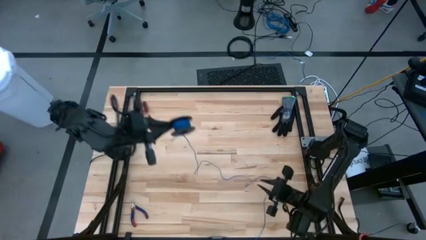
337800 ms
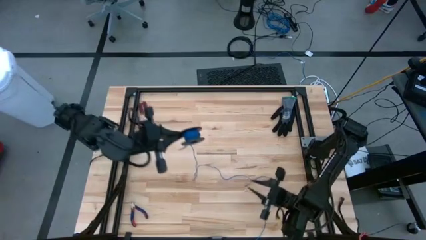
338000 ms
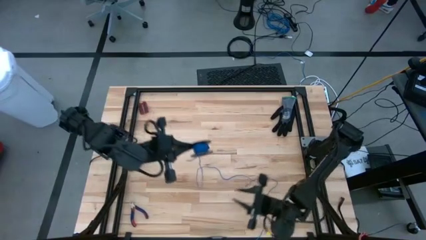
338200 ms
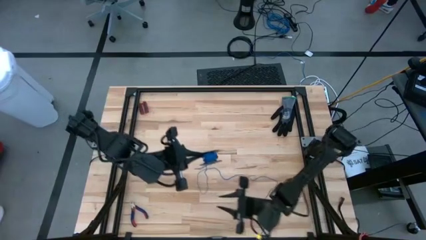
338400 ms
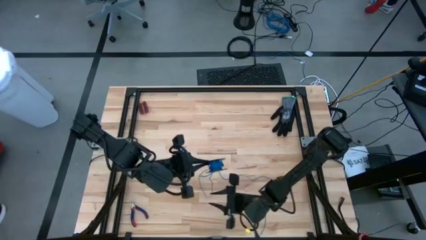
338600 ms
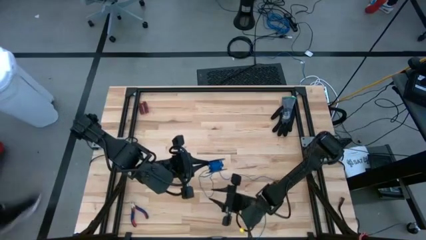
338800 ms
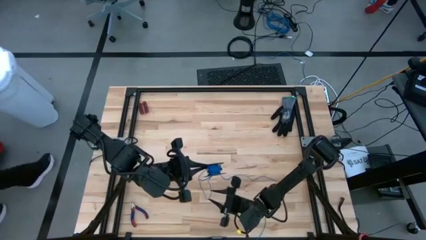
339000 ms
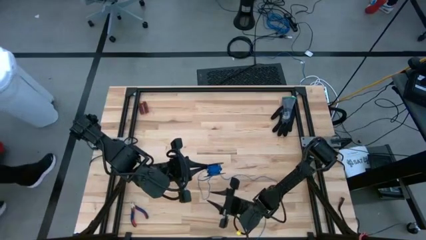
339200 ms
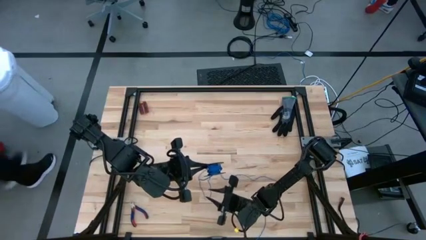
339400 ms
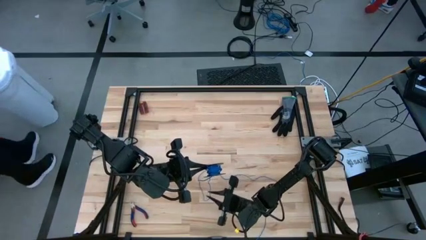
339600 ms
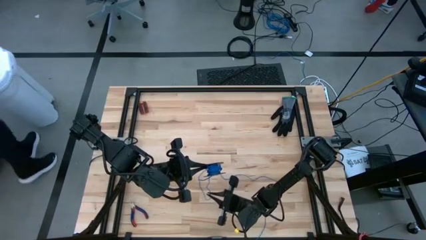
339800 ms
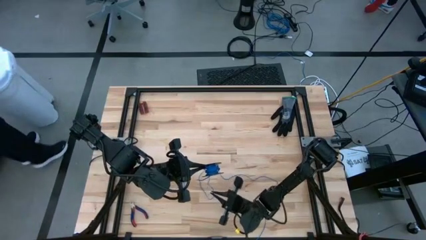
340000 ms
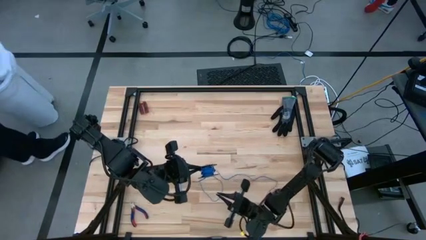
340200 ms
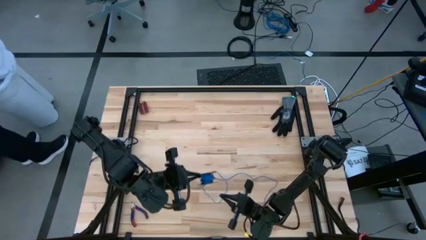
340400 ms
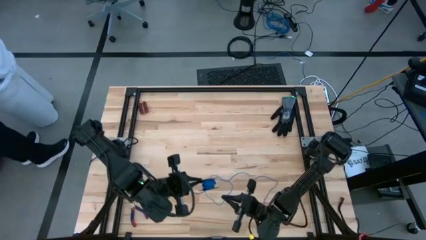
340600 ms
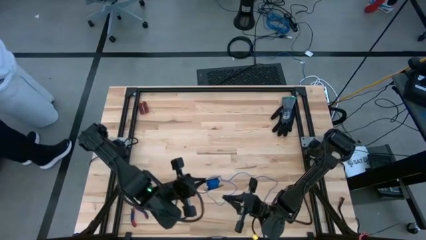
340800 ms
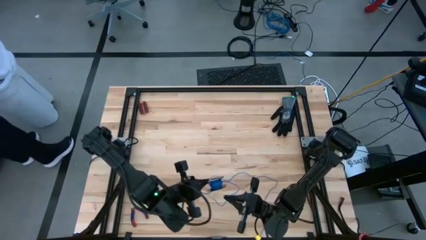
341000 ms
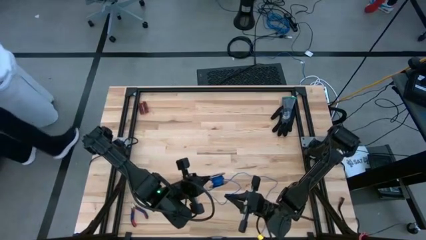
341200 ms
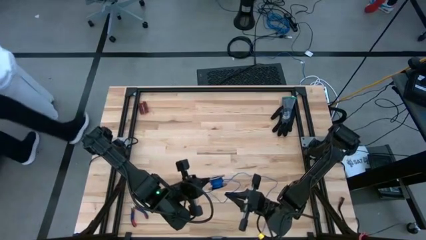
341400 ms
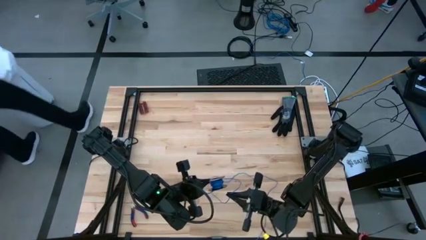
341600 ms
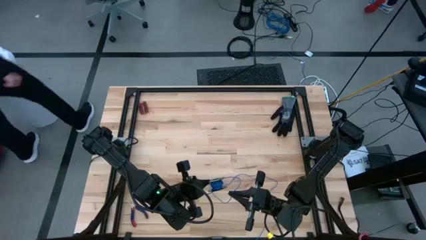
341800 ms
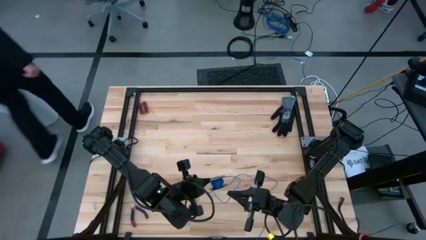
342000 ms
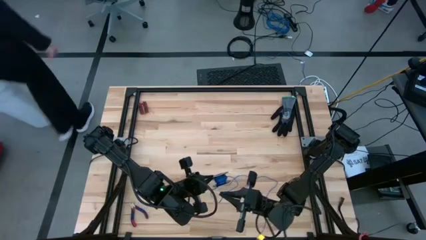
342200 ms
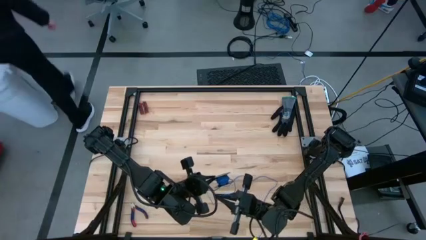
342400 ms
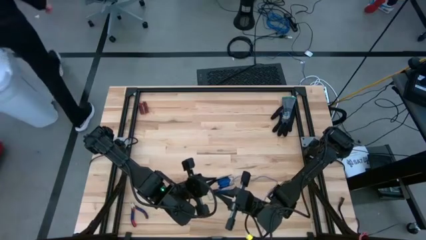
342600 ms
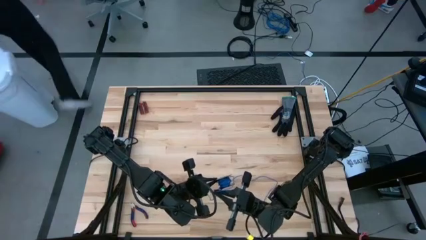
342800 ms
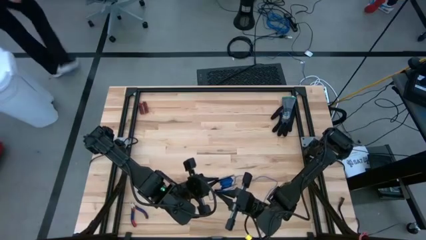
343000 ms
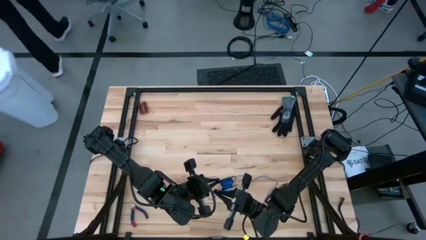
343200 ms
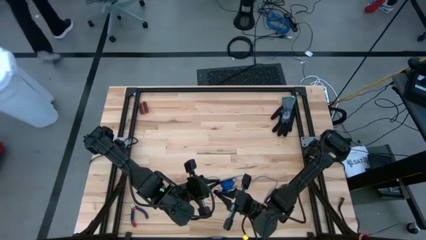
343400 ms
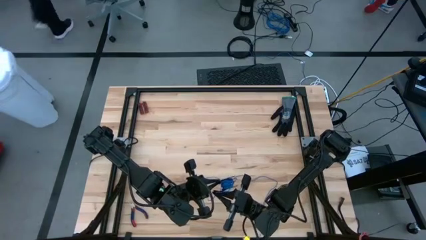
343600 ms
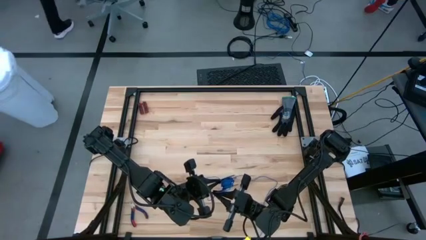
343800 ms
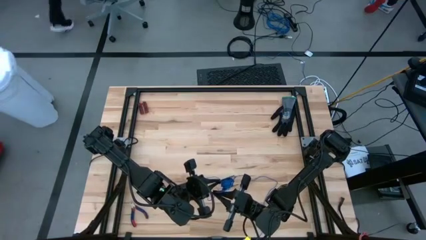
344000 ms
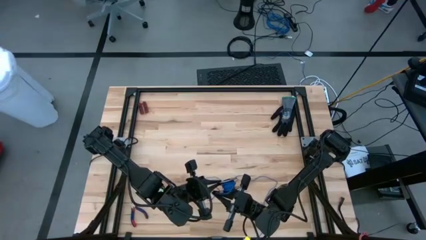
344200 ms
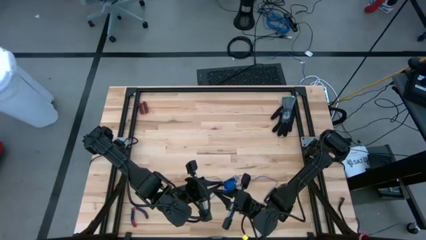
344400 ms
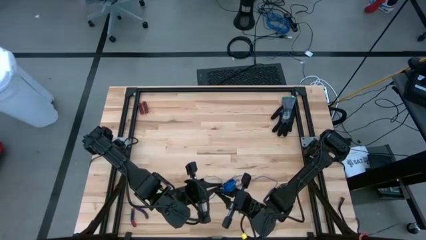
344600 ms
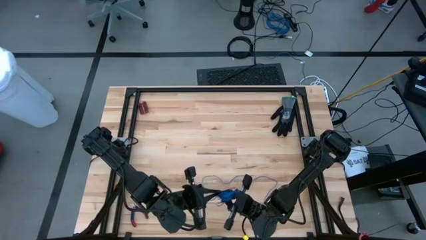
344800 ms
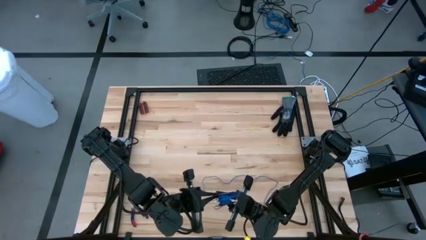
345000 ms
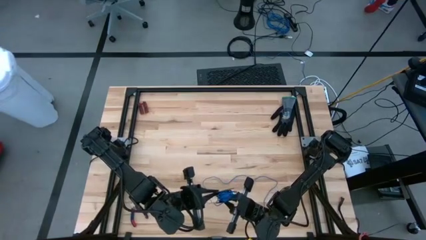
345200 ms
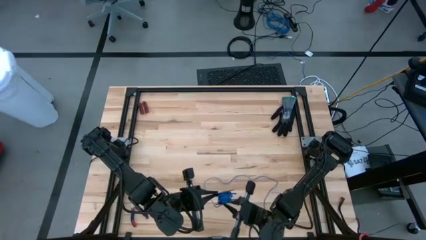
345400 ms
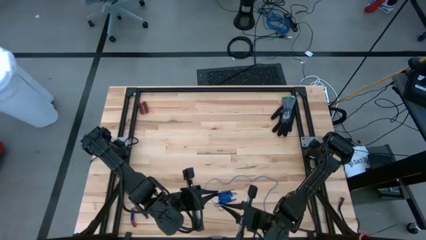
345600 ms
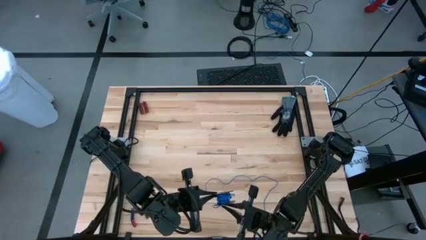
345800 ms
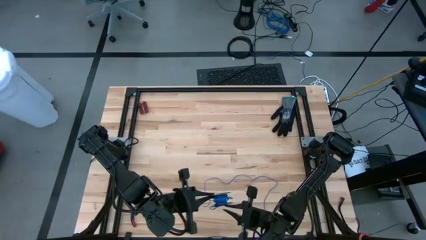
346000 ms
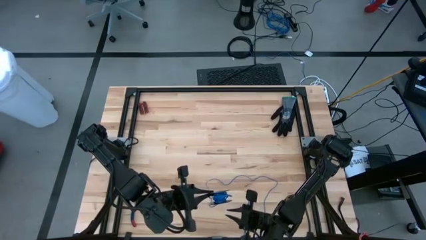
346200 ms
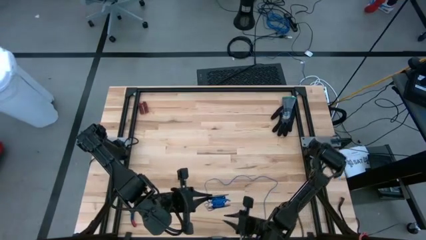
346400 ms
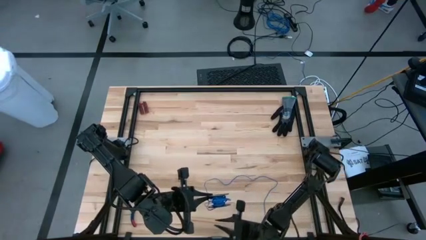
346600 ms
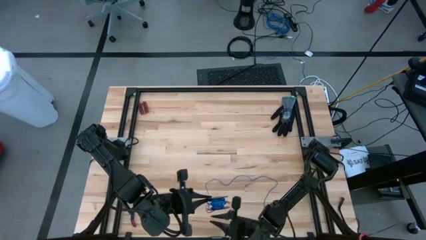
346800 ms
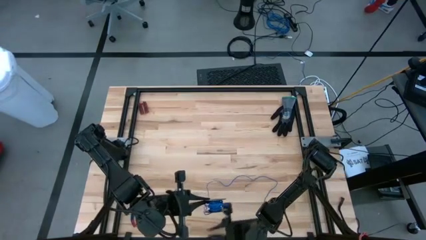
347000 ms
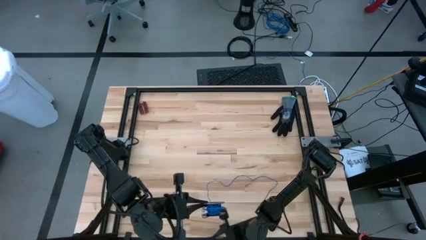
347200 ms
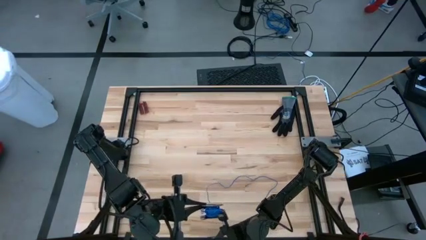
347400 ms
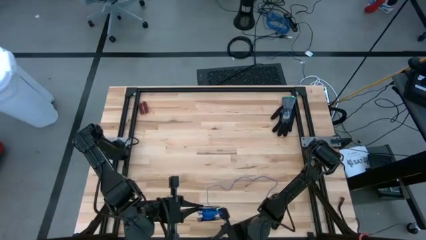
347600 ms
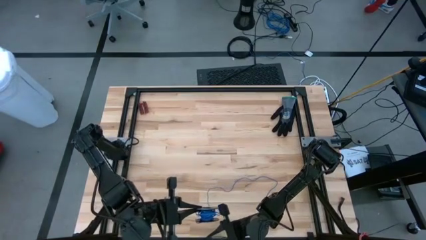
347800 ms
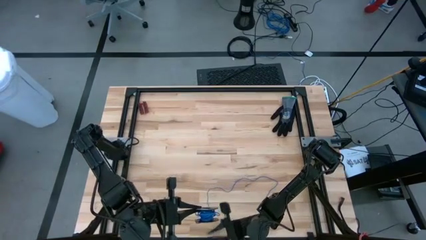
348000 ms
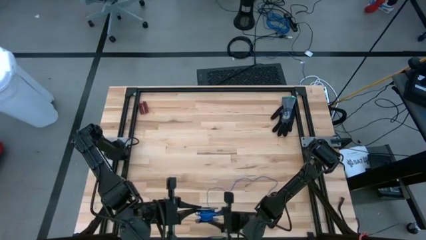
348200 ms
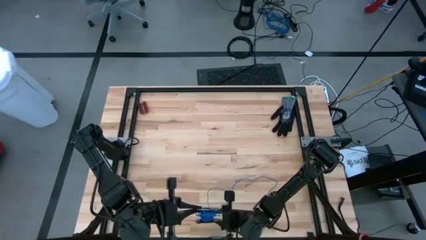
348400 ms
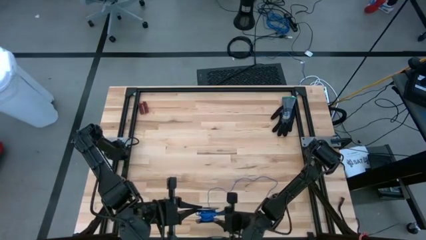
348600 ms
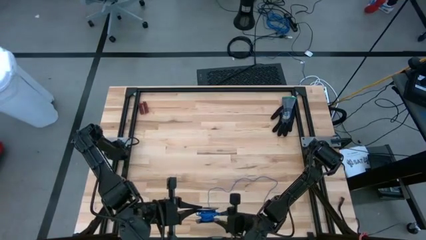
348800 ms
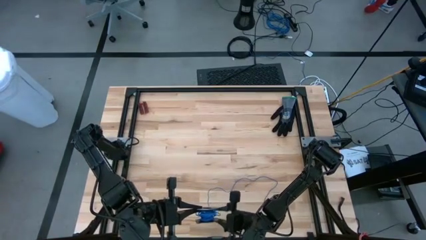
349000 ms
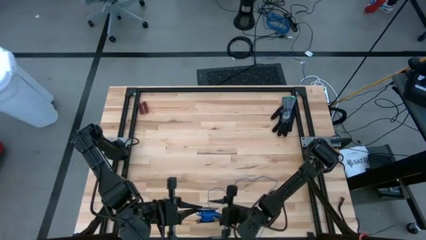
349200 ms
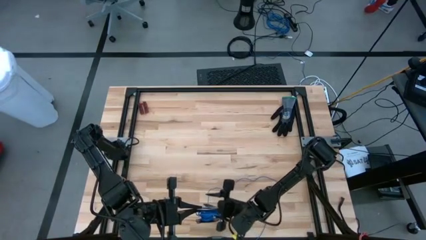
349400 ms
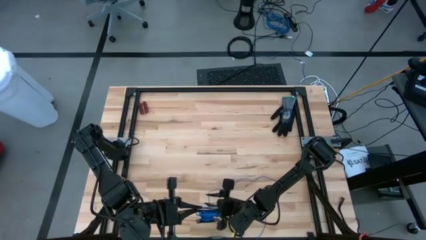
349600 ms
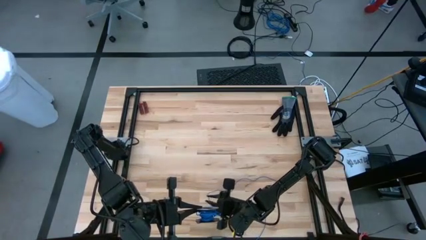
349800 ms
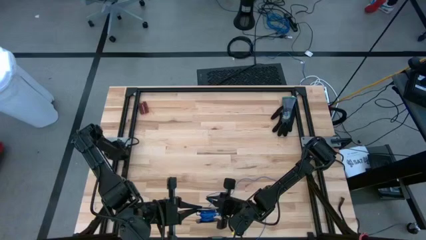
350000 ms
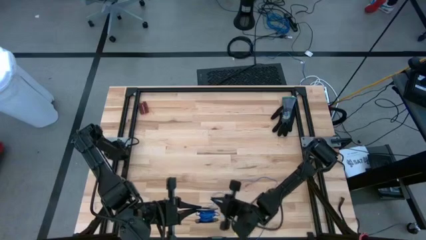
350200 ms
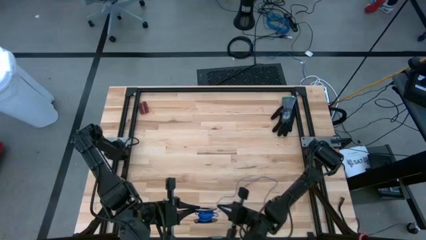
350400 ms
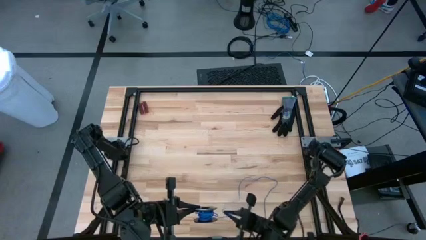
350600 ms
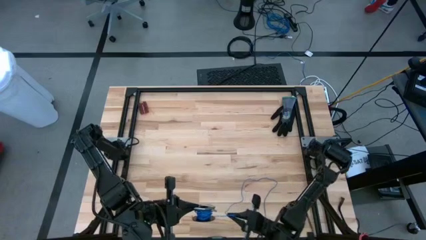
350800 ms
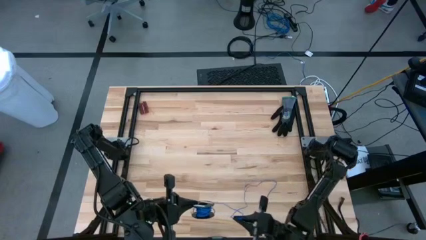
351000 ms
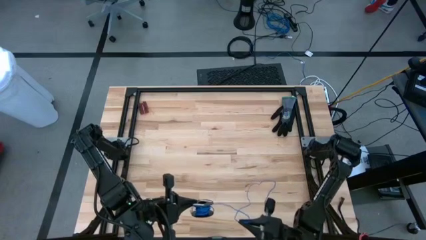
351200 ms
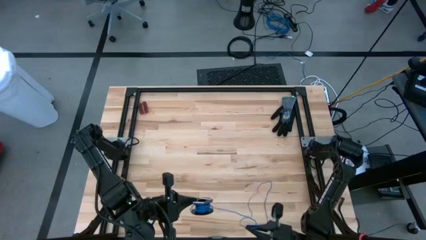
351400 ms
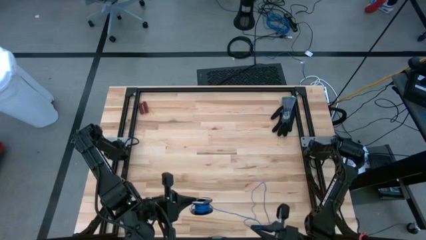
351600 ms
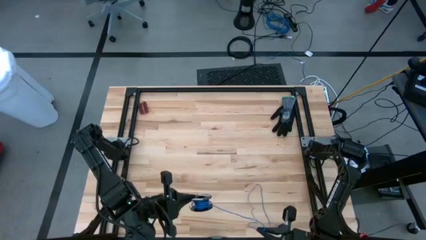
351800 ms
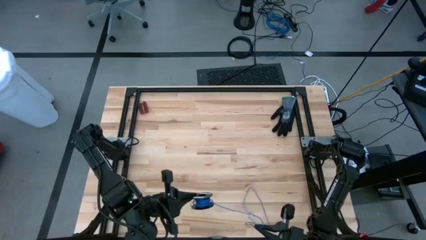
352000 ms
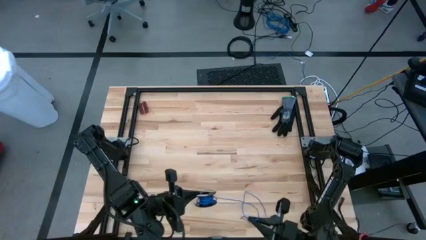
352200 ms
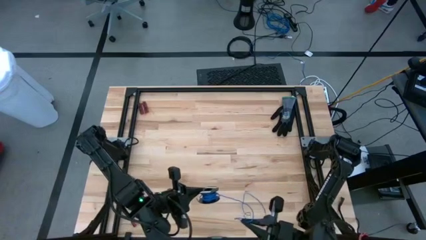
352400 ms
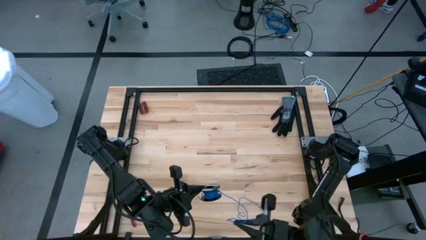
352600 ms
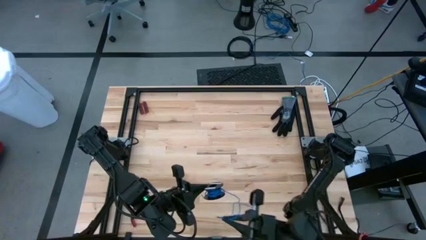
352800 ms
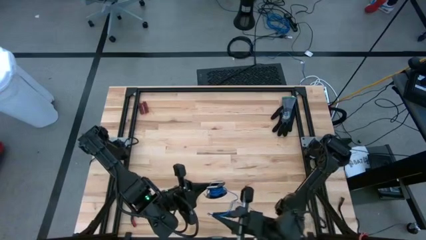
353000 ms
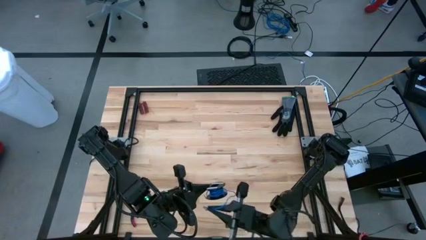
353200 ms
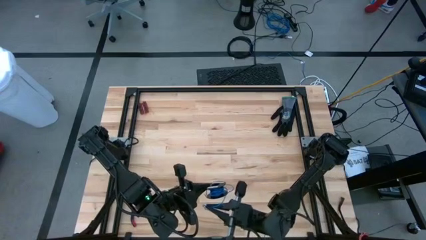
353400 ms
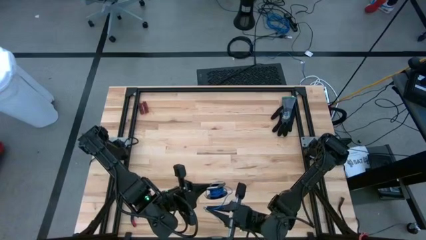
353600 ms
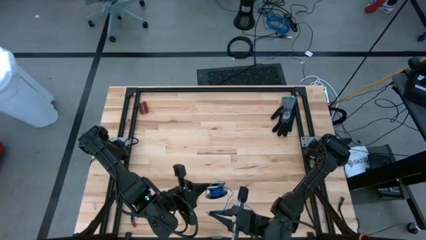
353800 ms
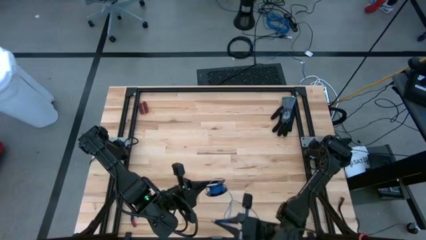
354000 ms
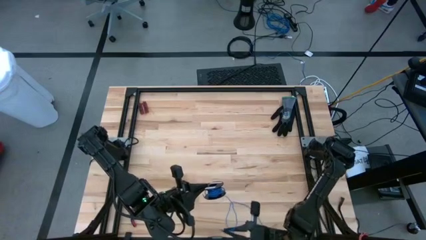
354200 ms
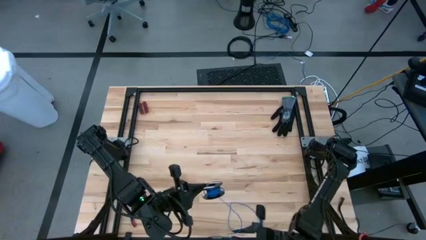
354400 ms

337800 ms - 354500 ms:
Task: Coil cords
Coil the blue wire onto a spool

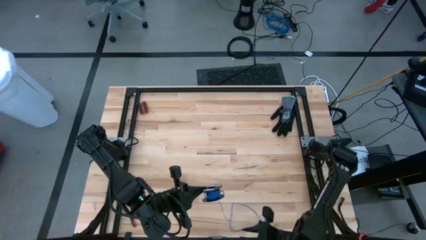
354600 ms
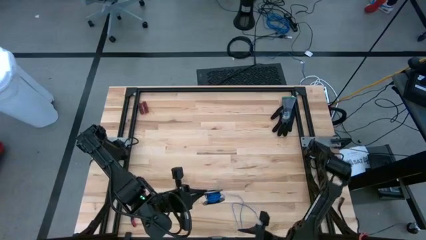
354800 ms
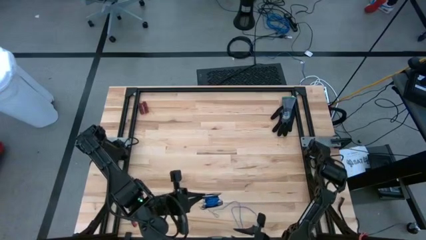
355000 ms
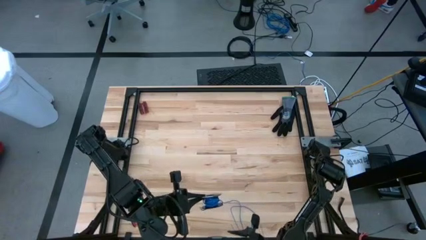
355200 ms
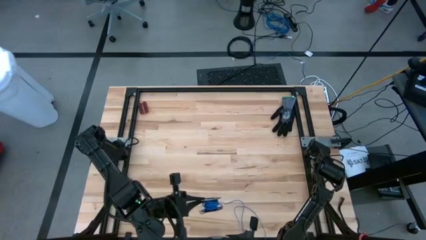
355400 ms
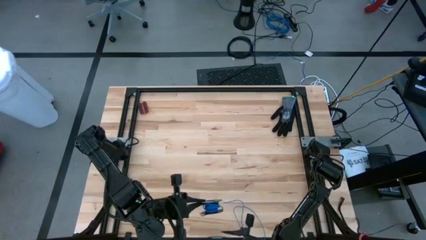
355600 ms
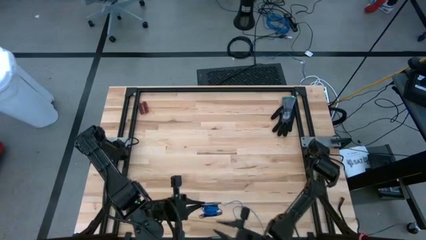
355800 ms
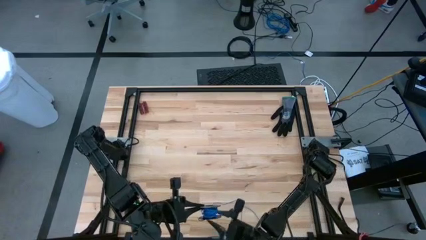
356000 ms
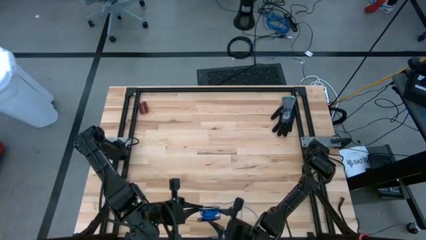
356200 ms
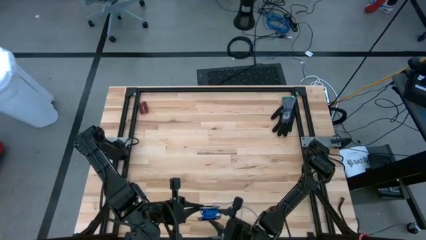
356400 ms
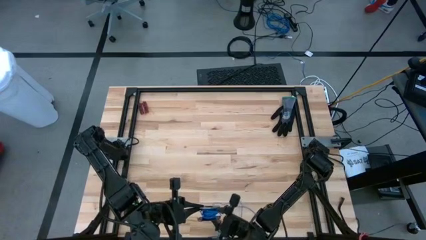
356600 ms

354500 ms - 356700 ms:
Coil the blue wire onto a spool
